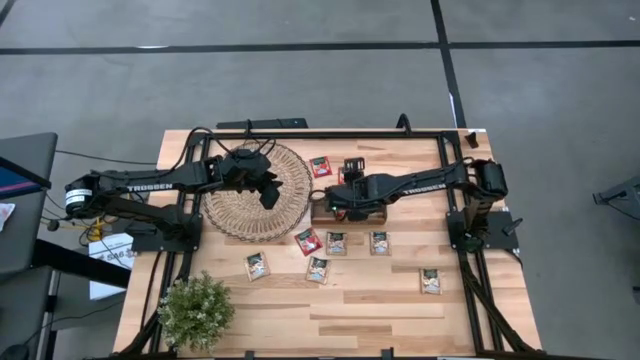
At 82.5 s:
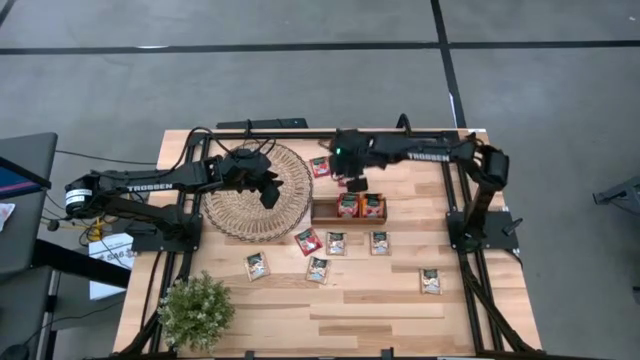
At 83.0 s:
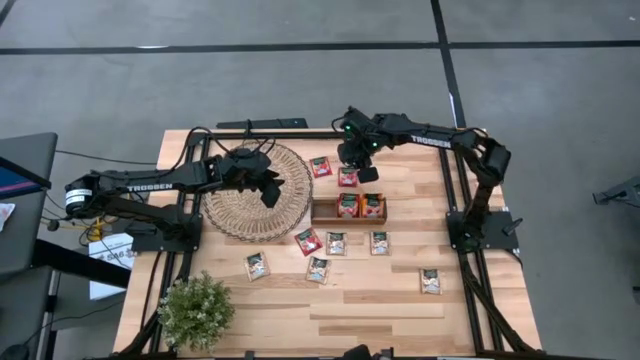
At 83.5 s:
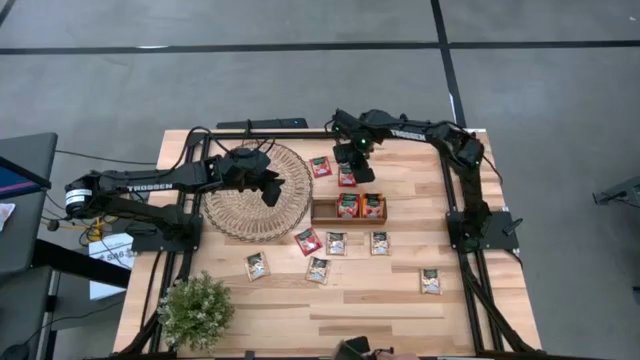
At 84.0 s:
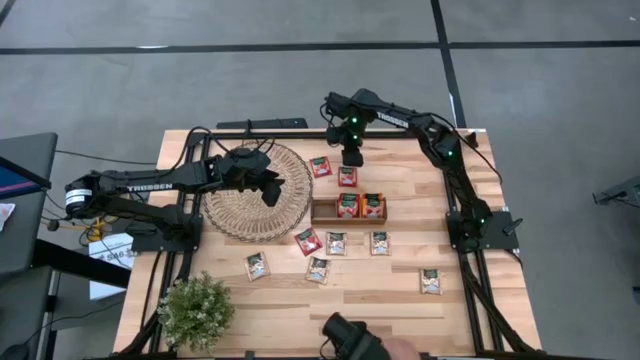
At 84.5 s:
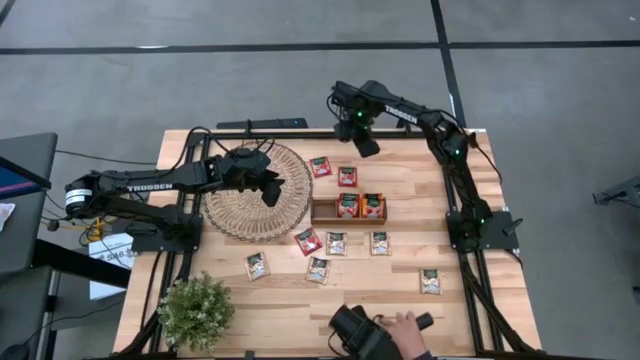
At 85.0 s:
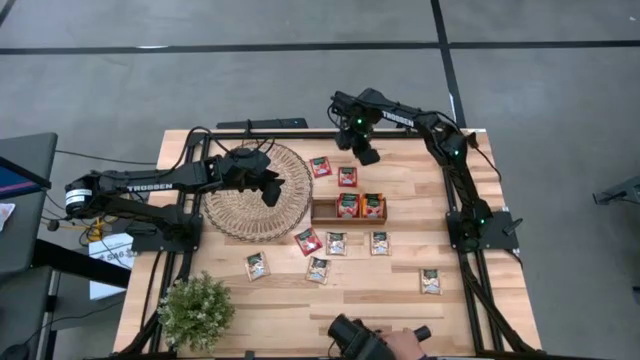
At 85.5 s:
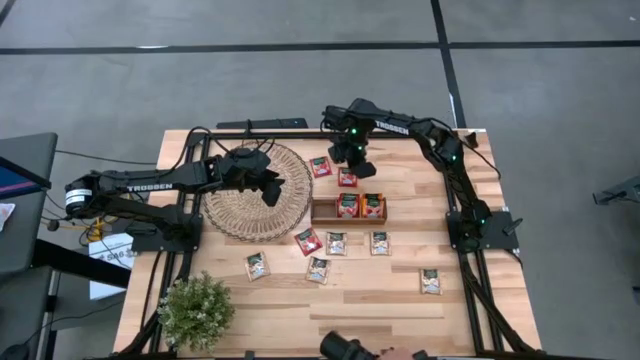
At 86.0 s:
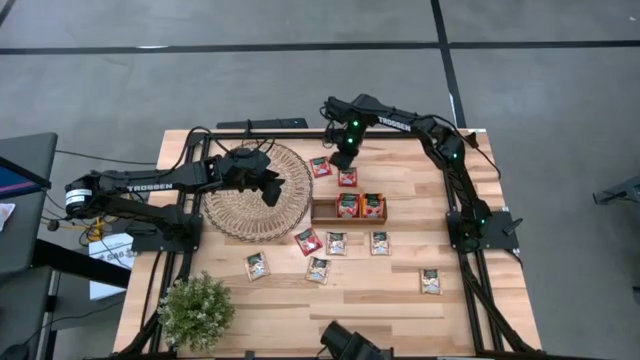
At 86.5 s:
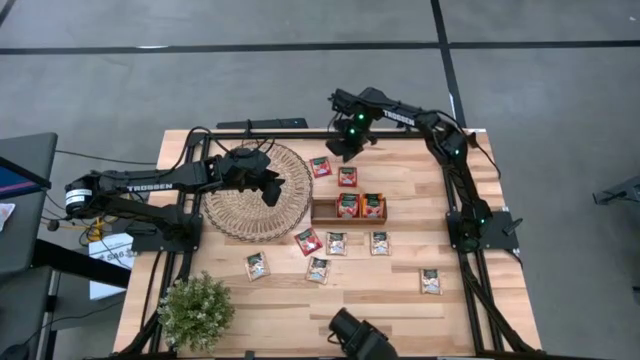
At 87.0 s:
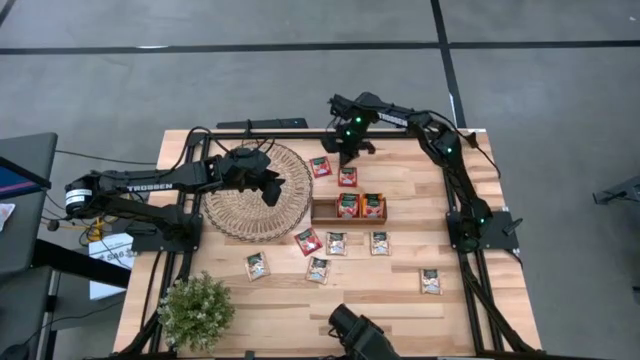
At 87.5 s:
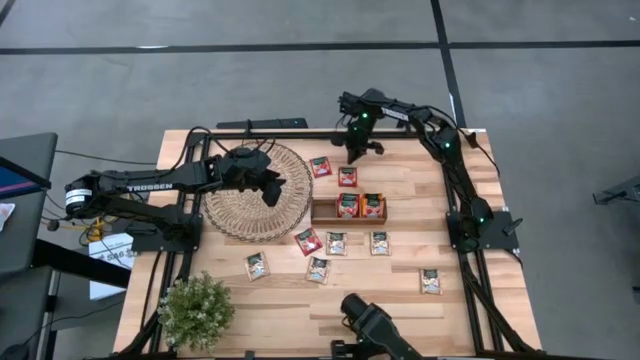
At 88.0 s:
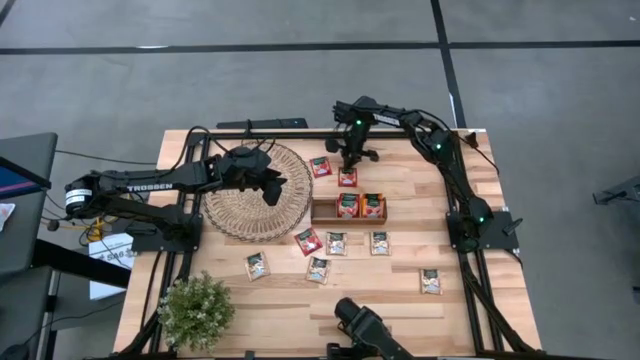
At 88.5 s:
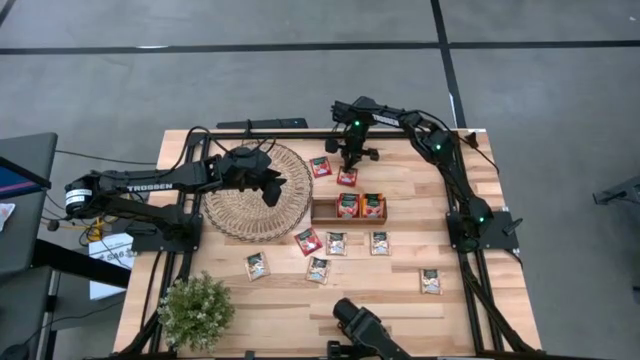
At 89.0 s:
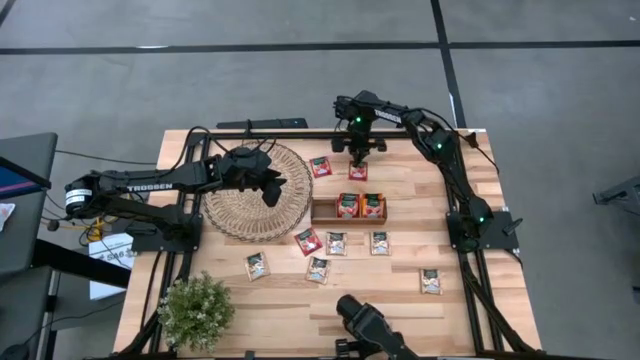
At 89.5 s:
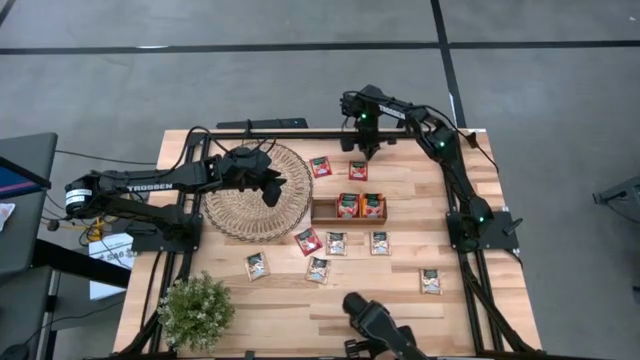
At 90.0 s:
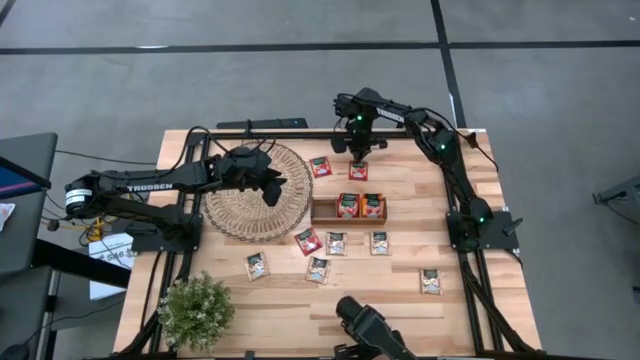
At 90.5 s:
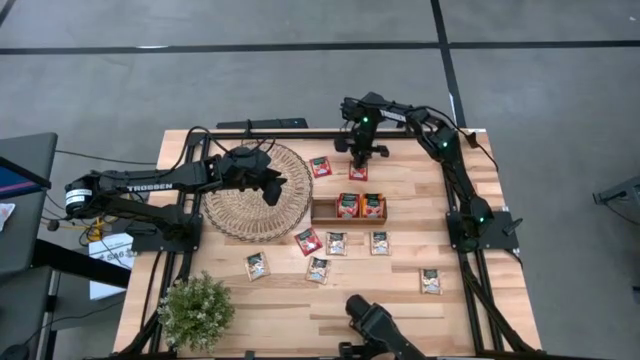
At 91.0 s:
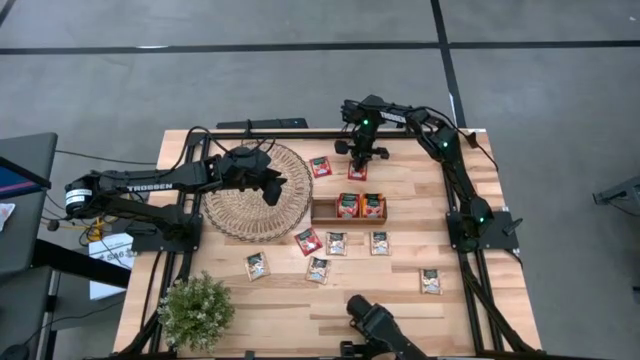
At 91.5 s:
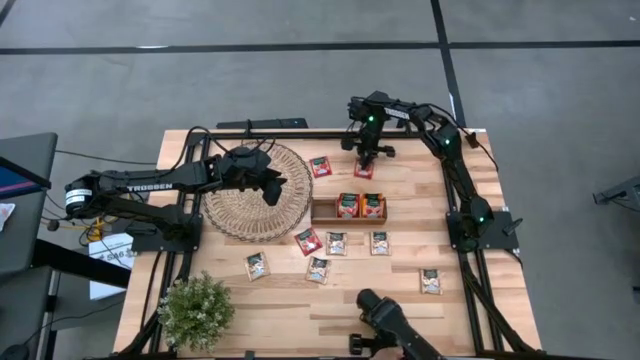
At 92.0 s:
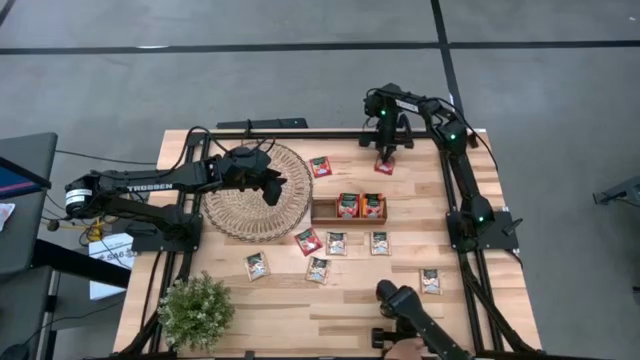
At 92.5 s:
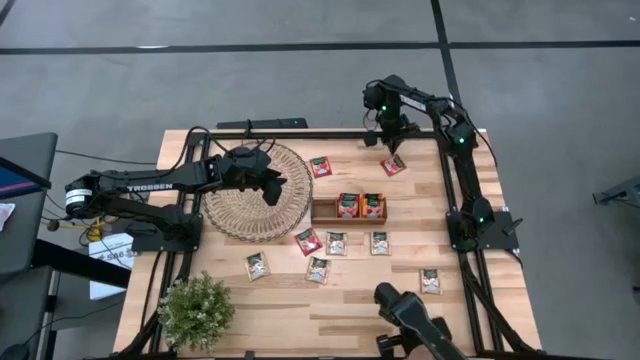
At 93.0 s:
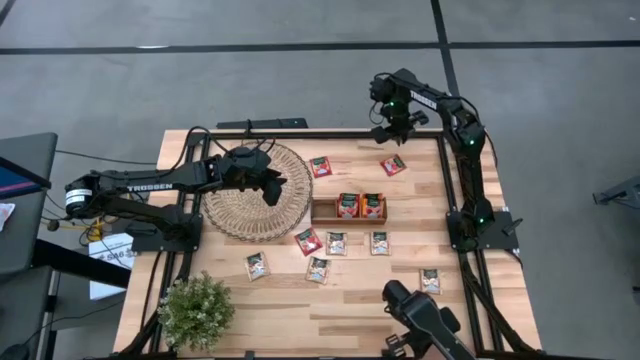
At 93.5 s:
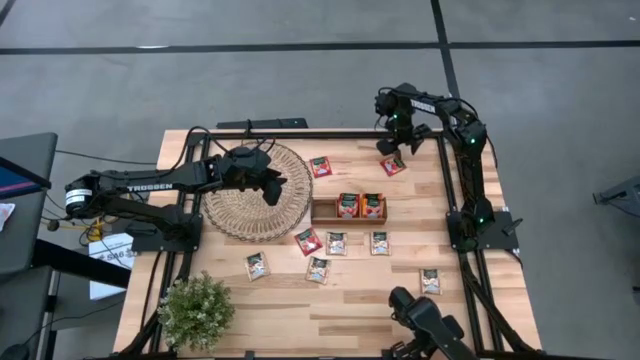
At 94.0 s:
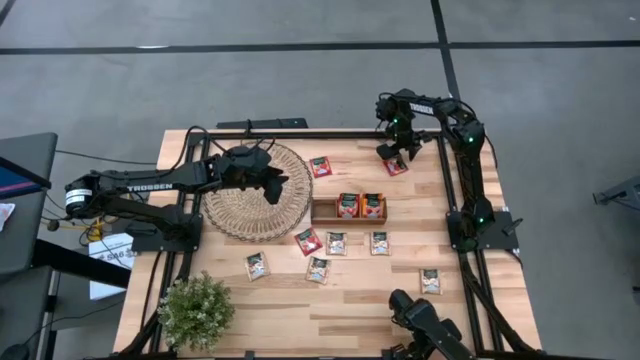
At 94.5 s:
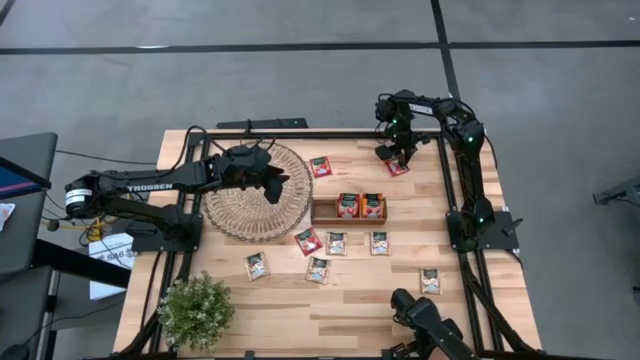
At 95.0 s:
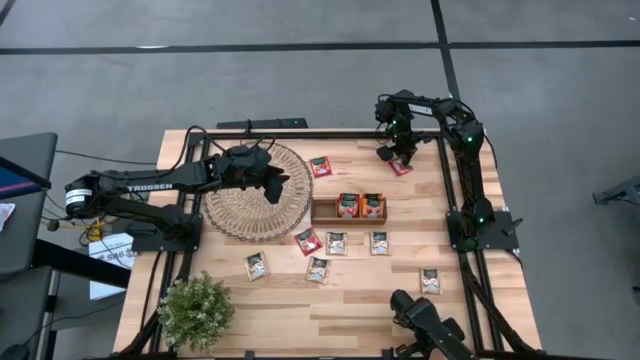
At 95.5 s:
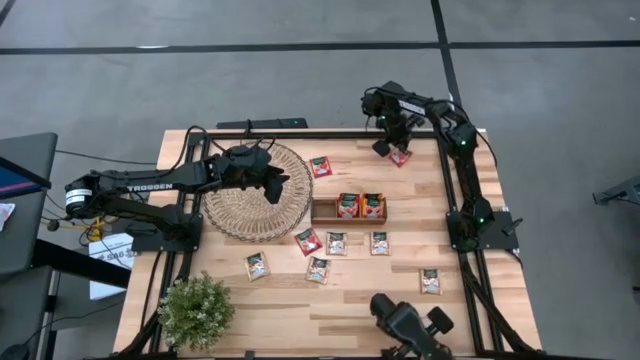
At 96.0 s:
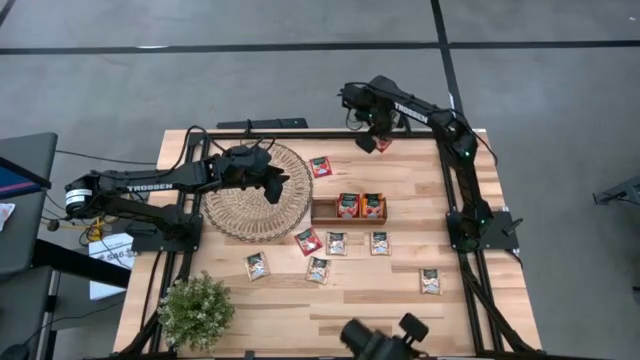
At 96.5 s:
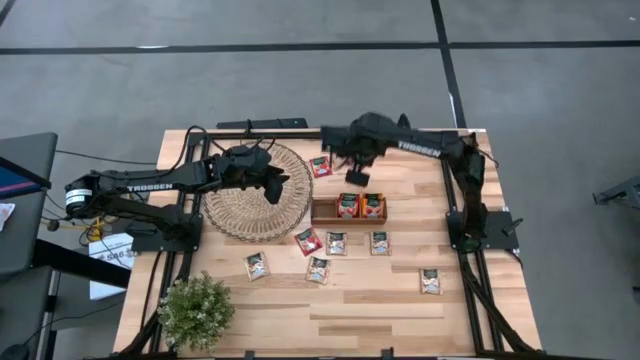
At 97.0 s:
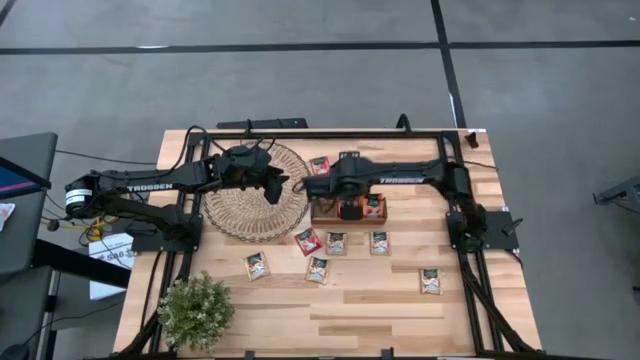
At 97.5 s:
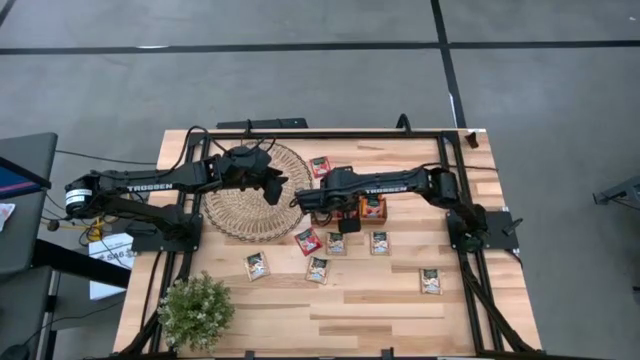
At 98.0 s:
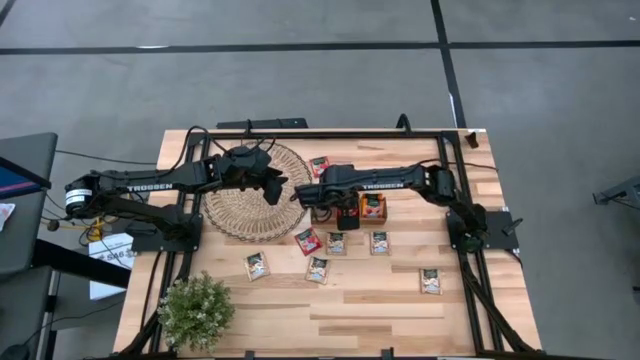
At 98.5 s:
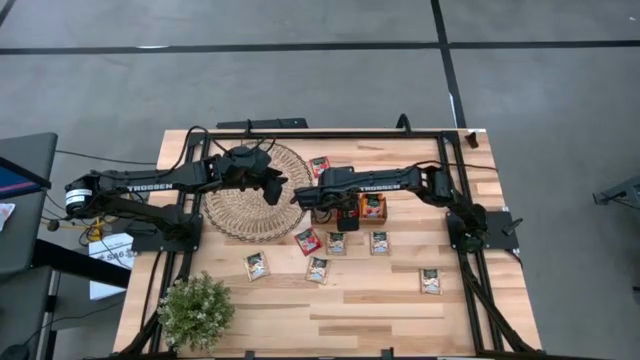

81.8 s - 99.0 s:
Task: Pick & Place Tea
Put the red tea bag into the middle section of the wooden organizer

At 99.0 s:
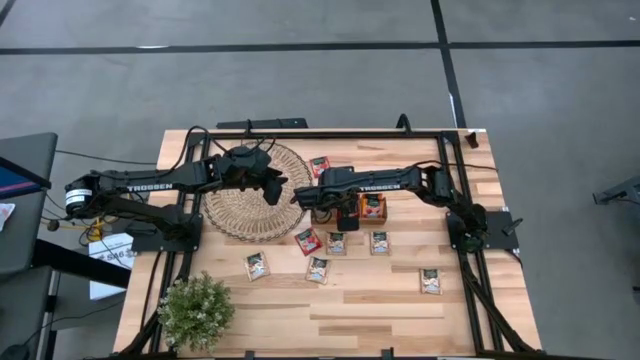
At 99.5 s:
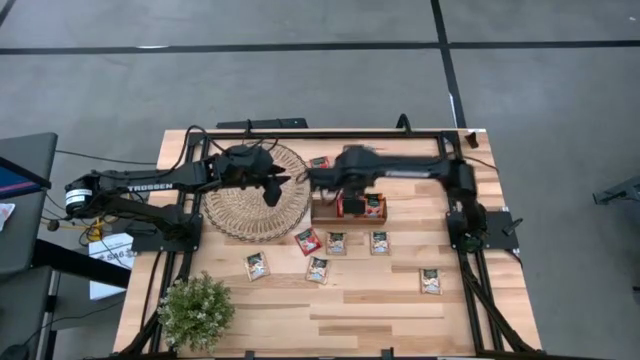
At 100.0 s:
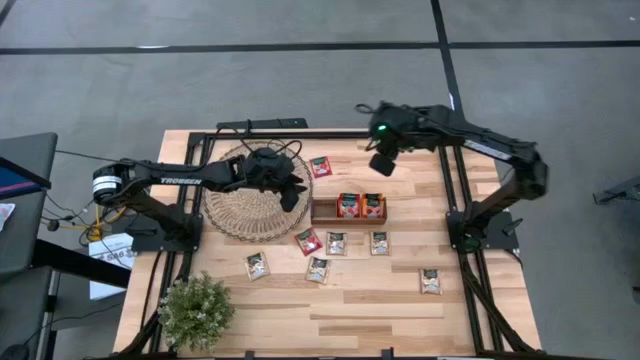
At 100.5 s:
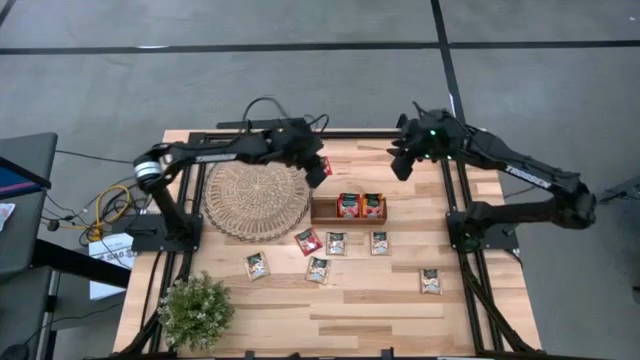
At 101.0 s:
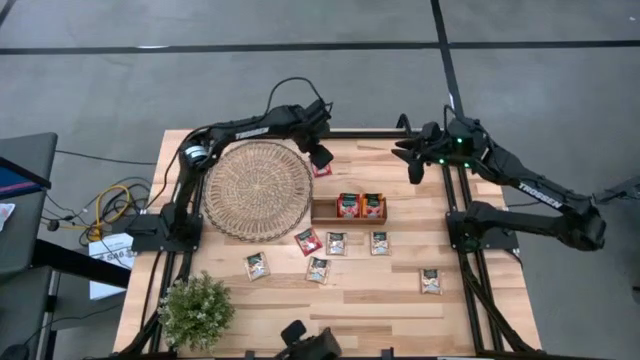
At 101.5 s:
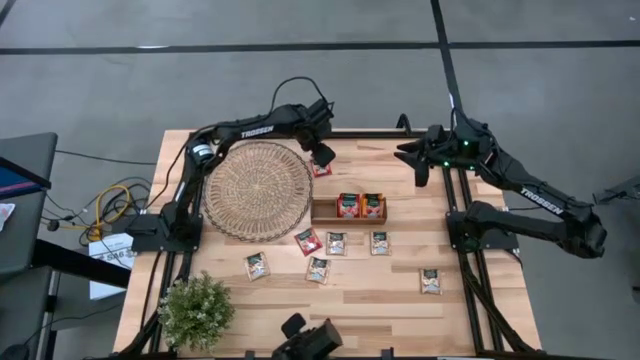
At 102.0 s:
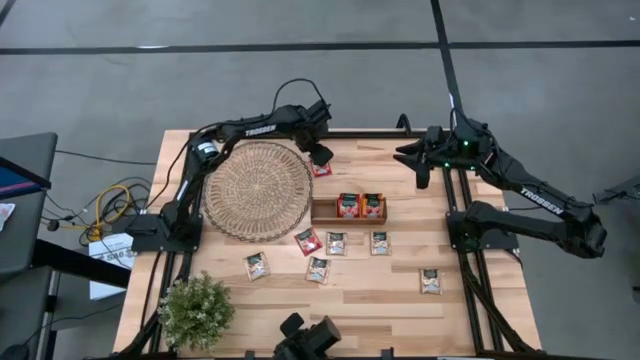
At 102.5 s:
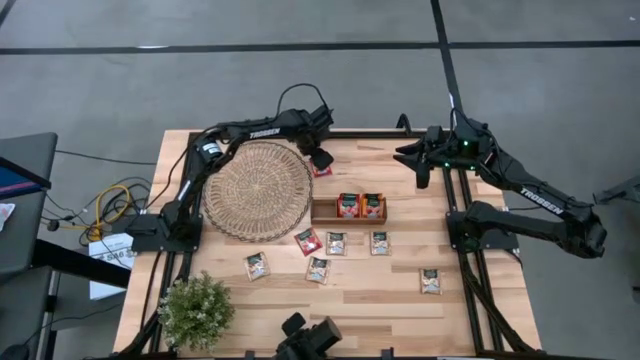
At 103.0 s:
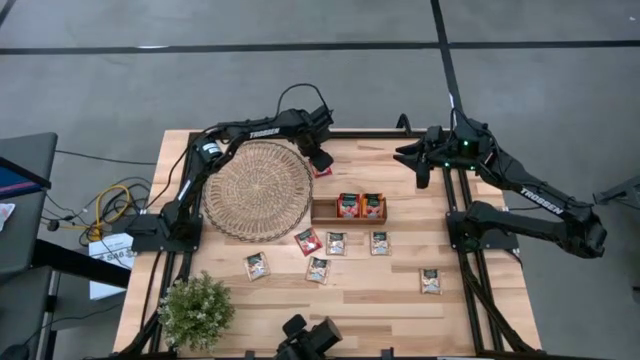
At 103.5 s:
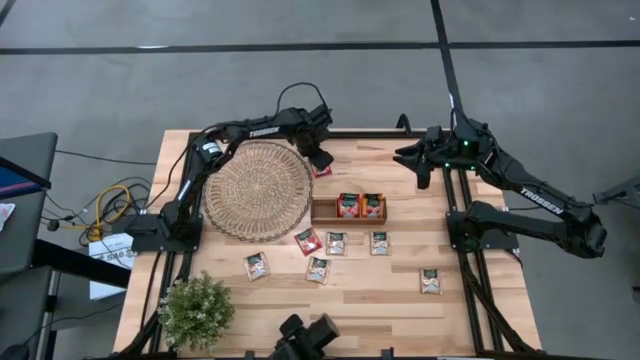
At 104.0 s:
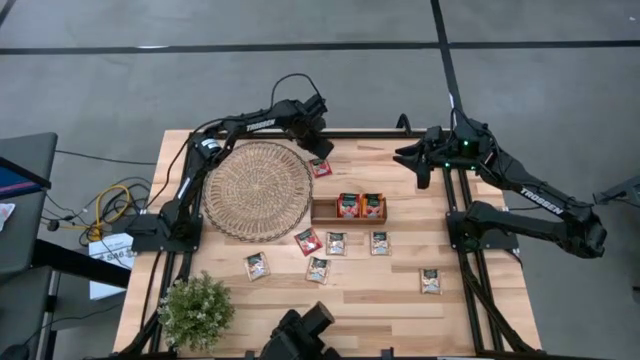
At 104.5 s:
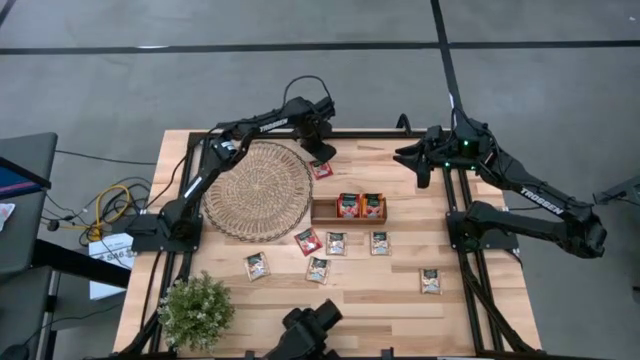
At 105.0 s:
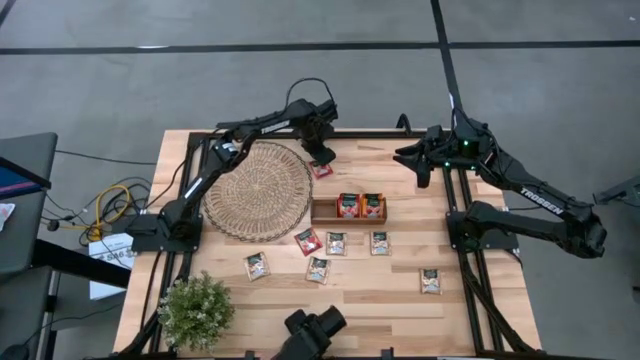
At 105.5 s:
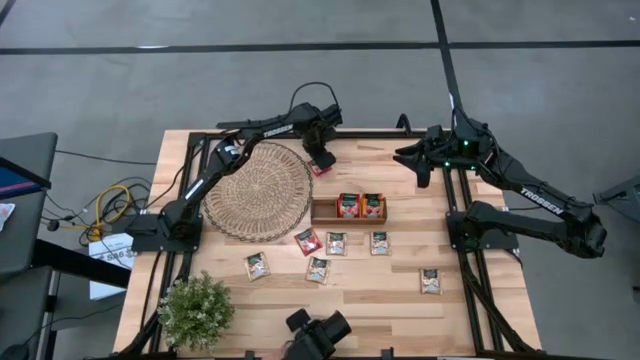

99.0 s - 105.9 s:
Put the red tea bag into the middle section of the wooden organizer
